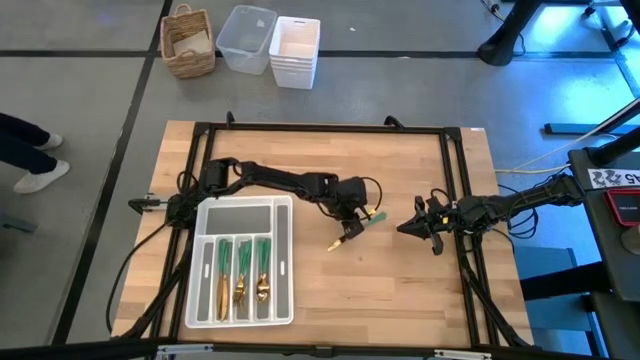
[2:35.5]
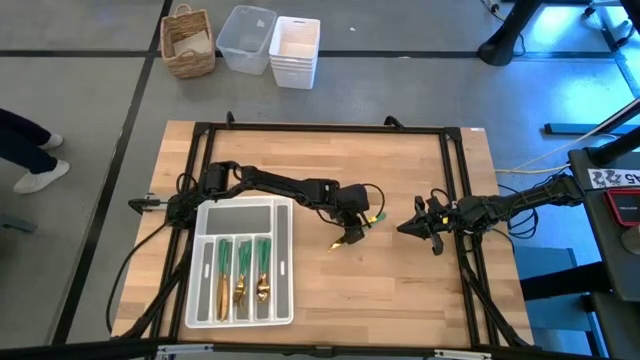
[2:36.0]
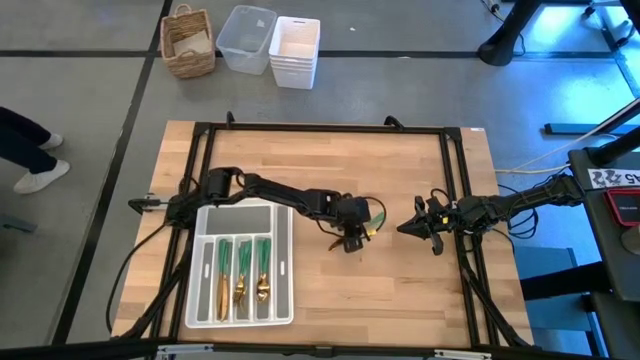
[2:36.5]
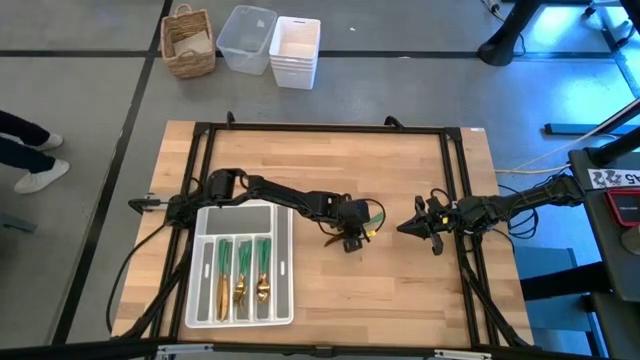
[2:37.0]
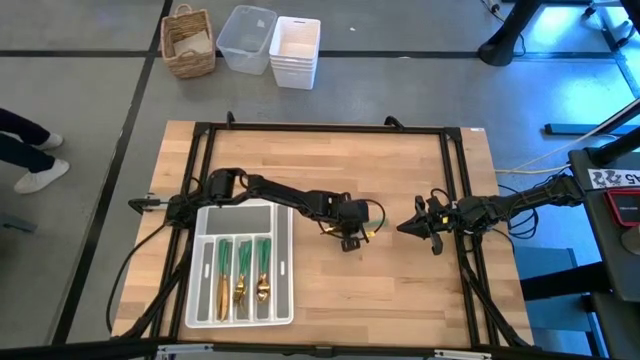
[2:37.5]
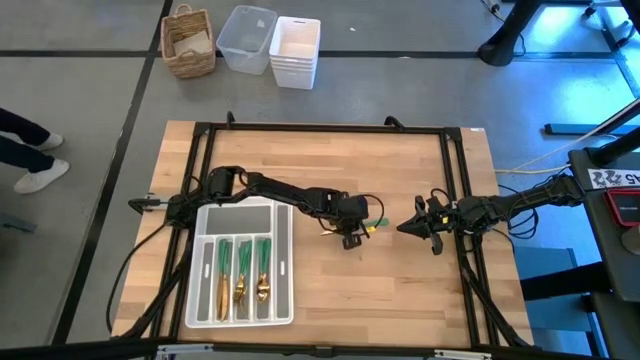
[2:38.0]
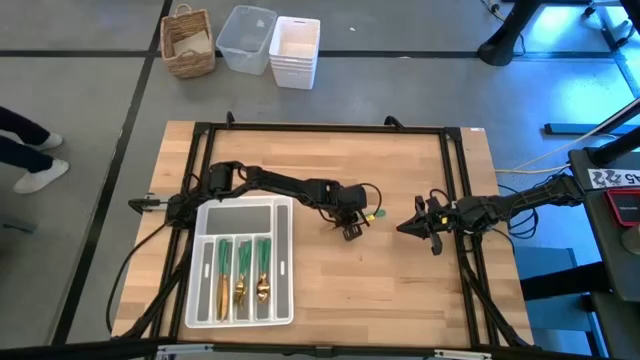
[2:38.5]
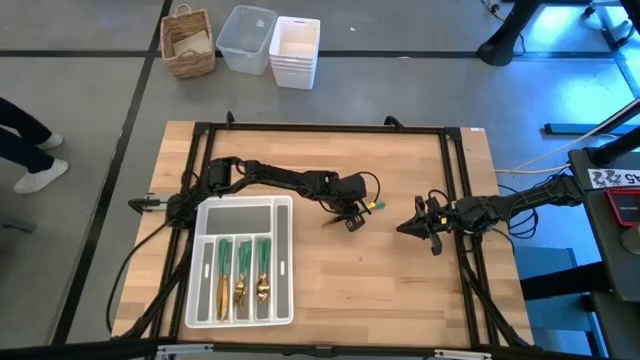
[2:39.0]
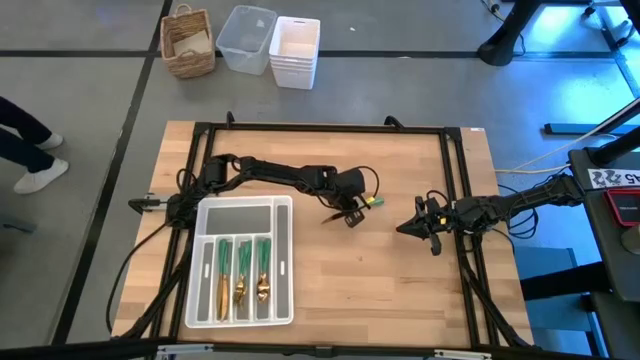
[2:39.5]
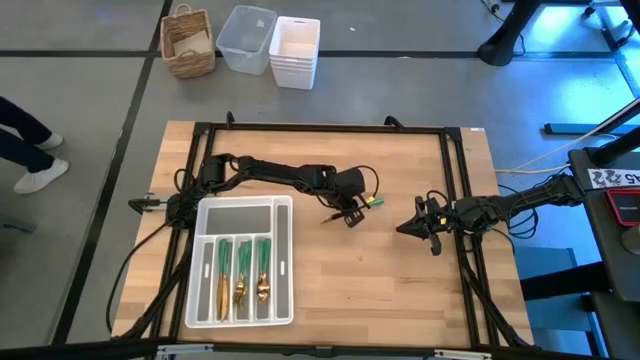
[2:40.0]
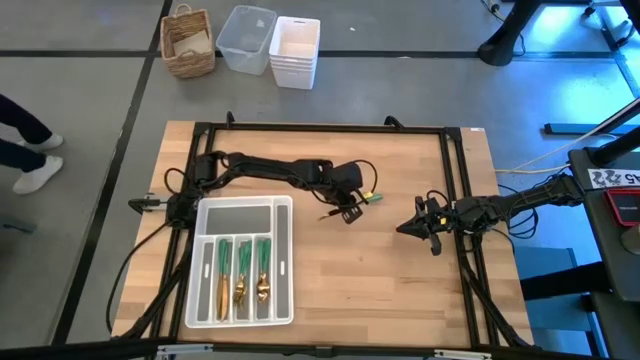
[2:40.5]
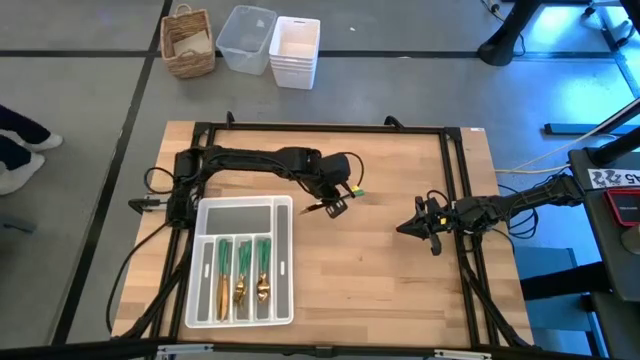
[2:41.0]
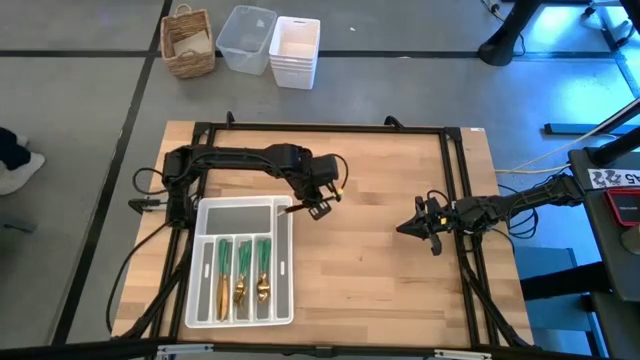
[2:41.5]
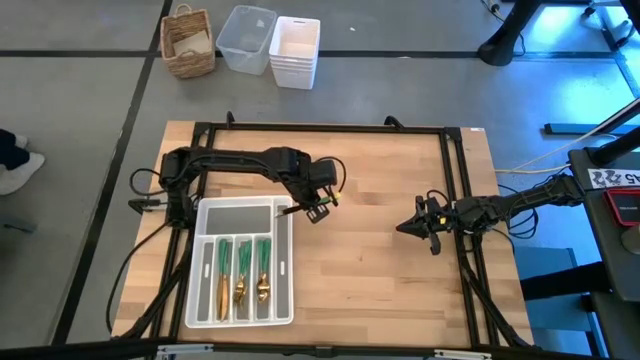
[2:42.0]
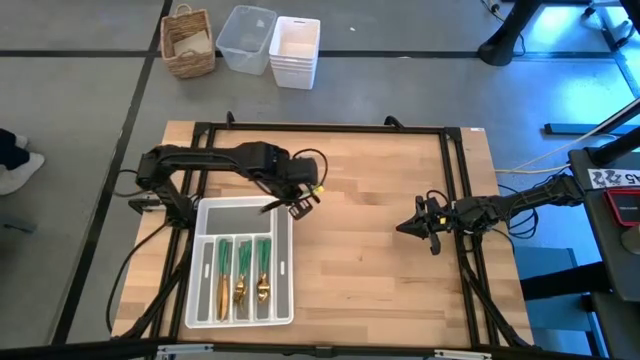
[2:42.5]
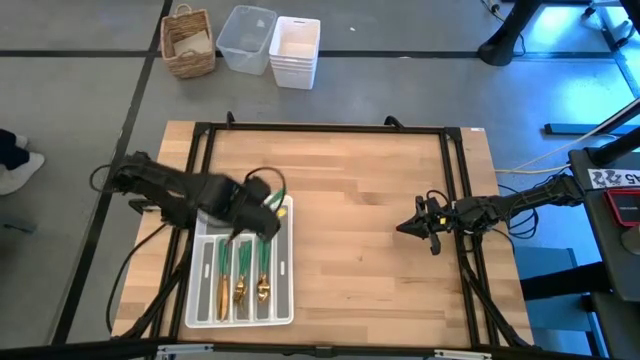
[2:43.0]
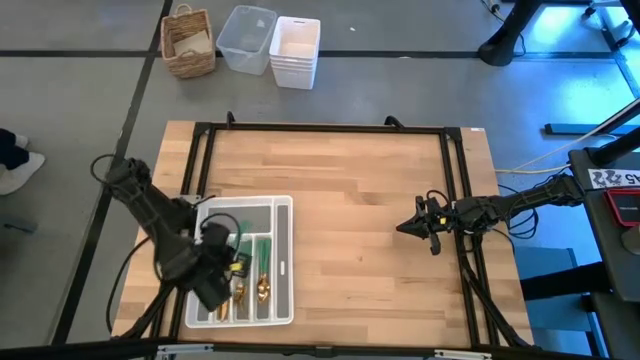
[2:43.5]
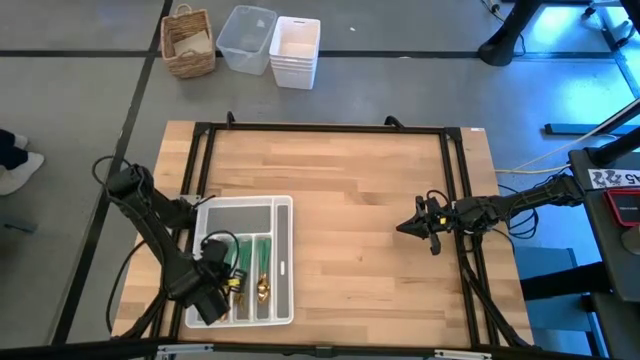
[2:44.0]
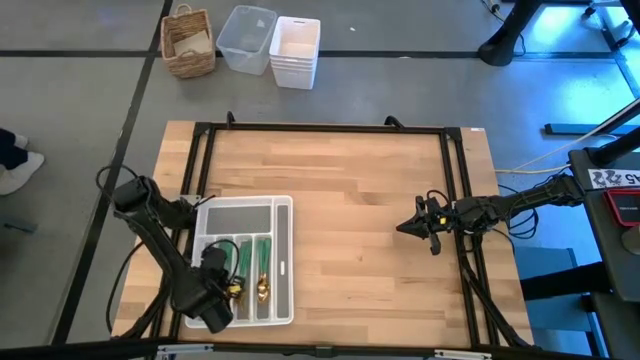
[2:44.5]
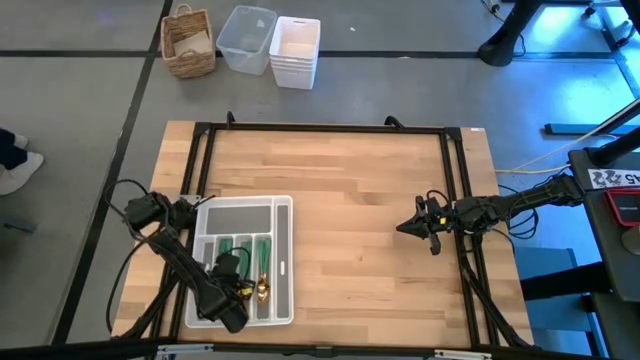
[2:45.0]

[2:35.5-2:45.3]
Task: Sort silverware
Put the green knife on the silverware tray

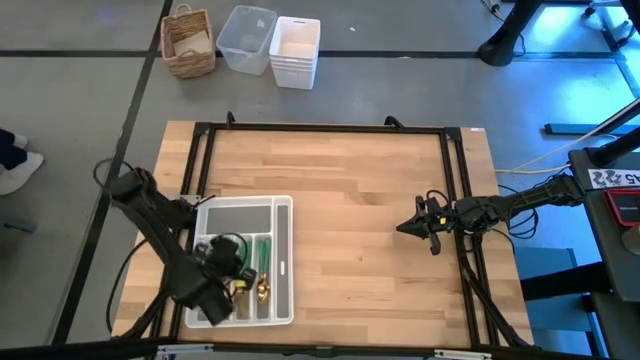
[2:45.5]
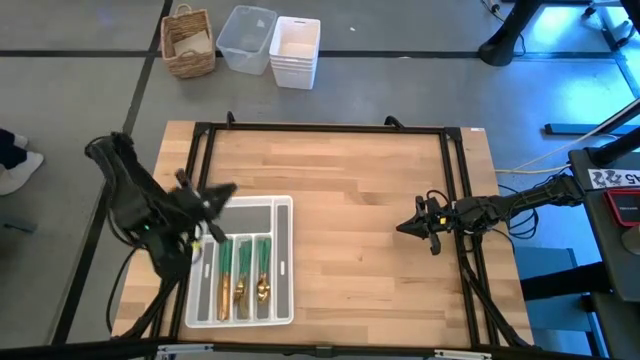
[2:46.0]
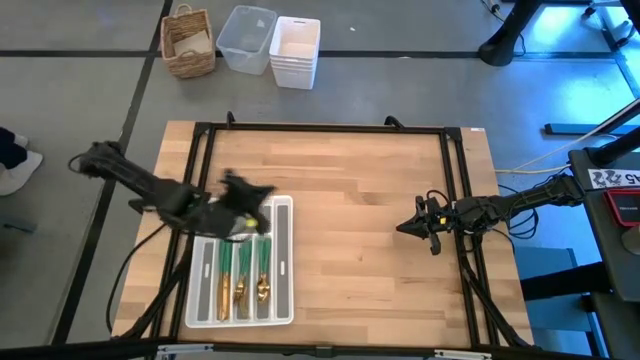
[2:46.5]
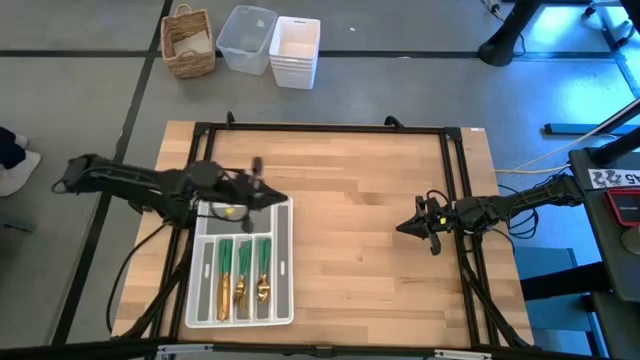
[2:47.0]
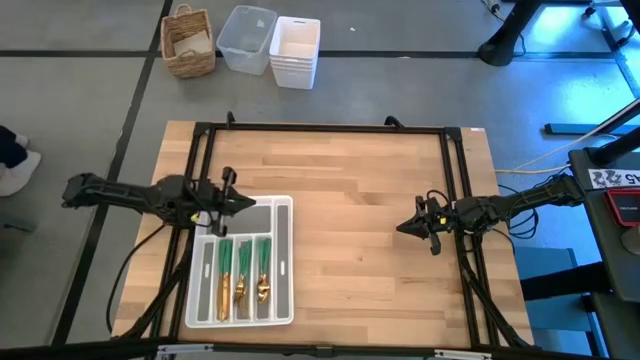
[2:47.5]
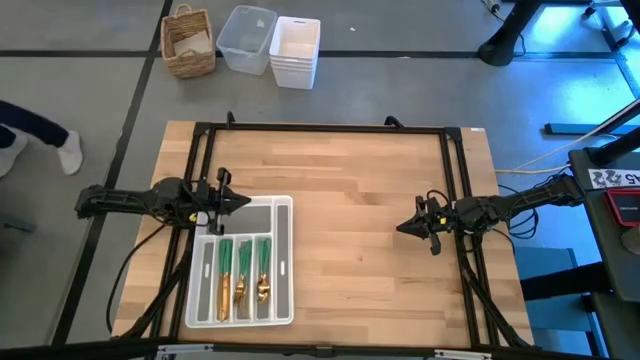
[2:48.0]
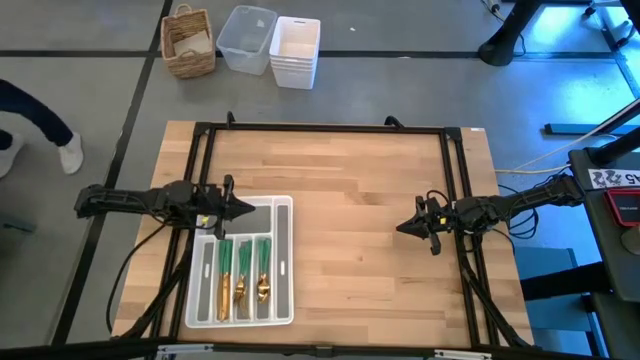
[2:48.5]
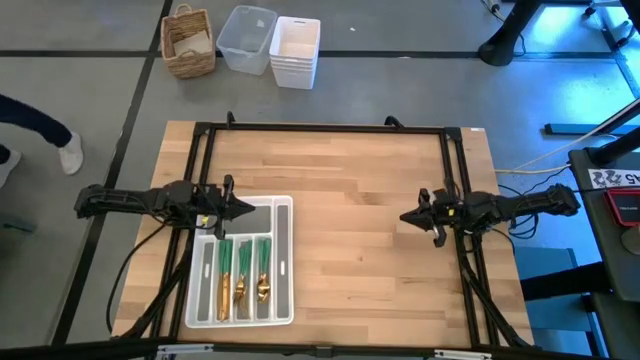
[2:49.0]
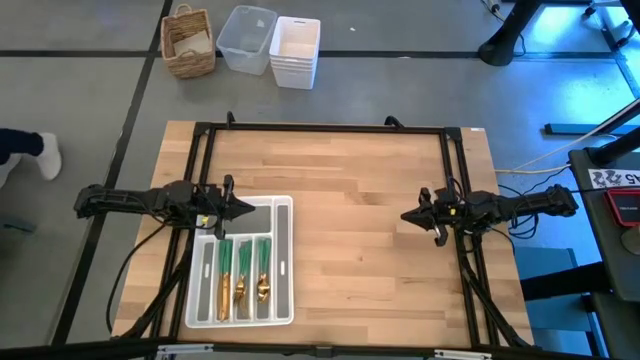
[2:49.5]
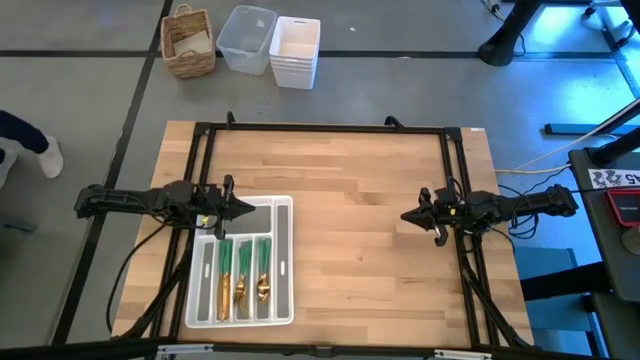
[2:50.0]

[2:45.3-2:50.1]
Return to Home Position
